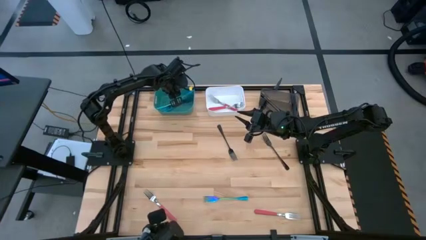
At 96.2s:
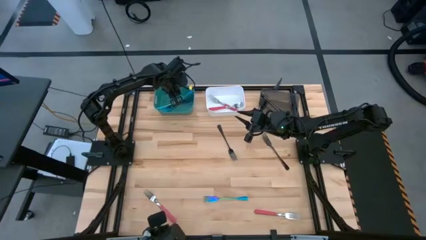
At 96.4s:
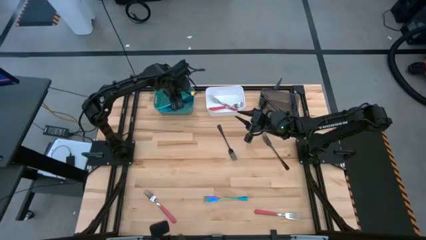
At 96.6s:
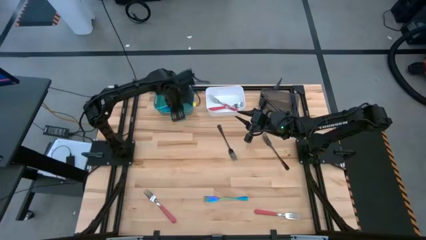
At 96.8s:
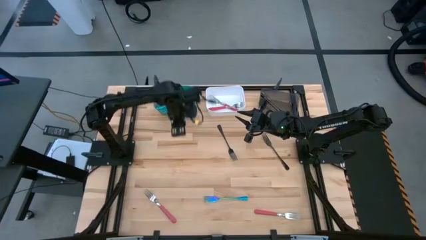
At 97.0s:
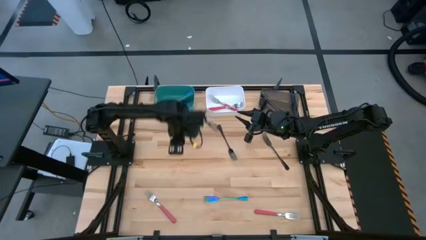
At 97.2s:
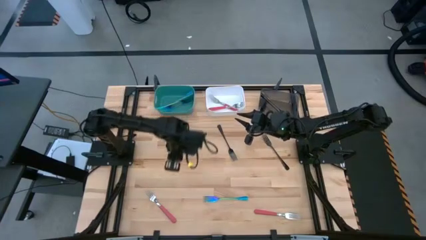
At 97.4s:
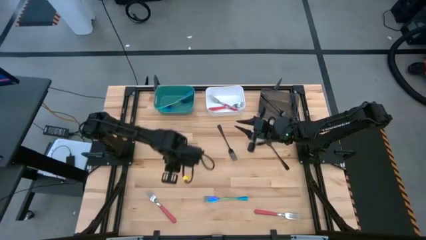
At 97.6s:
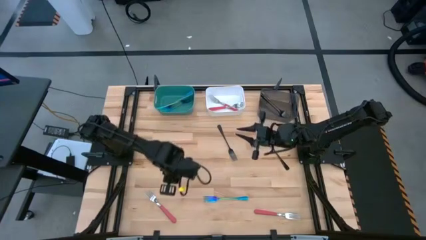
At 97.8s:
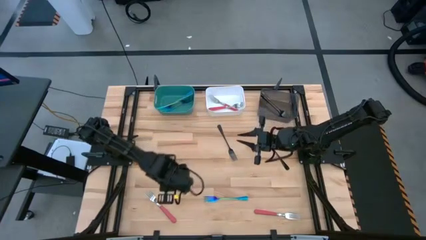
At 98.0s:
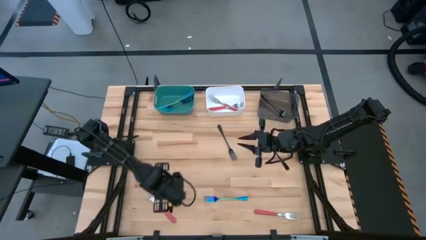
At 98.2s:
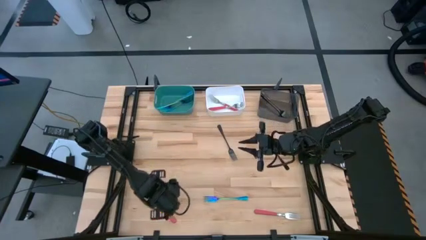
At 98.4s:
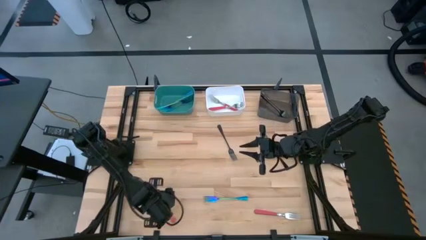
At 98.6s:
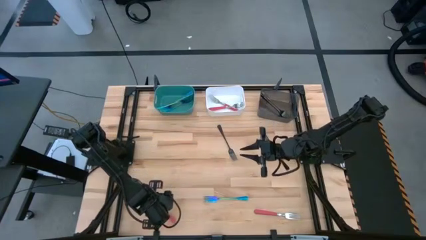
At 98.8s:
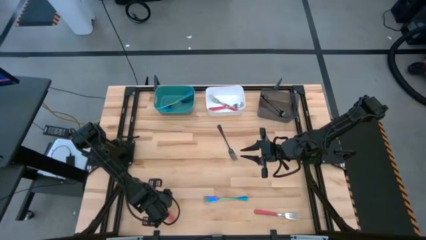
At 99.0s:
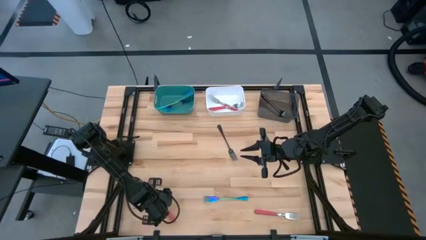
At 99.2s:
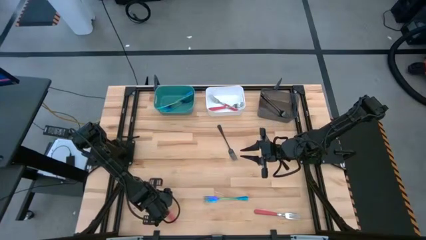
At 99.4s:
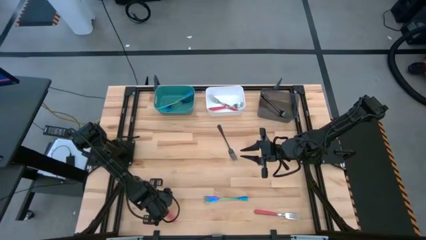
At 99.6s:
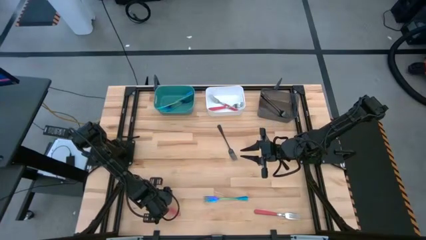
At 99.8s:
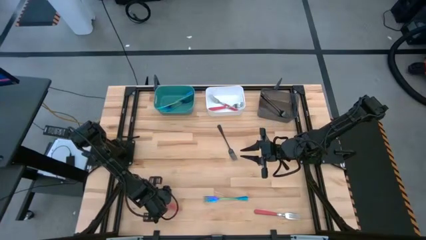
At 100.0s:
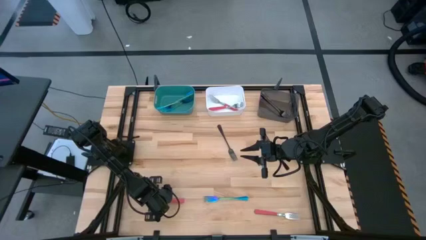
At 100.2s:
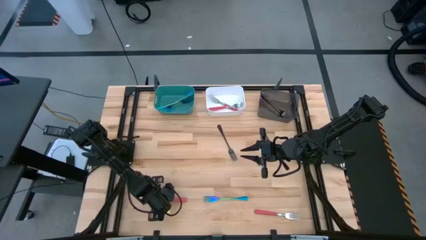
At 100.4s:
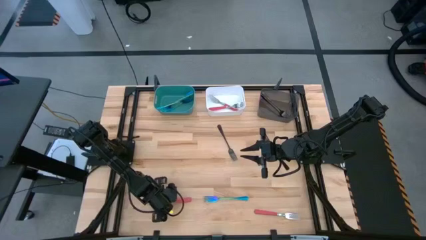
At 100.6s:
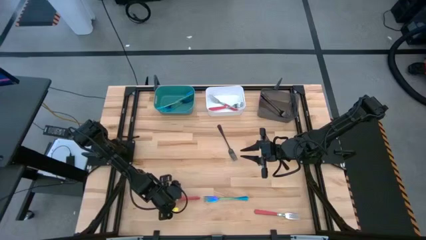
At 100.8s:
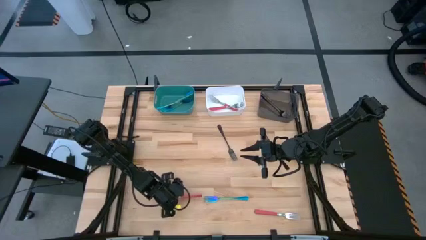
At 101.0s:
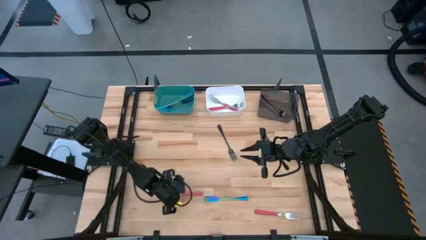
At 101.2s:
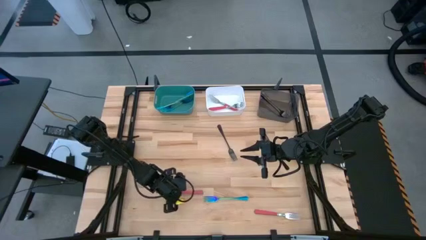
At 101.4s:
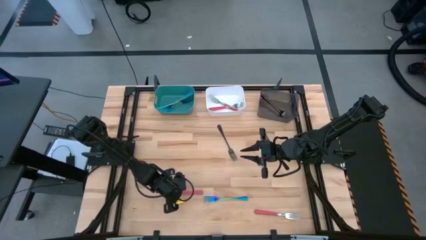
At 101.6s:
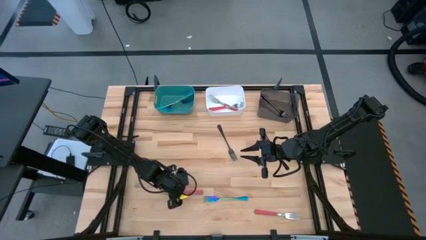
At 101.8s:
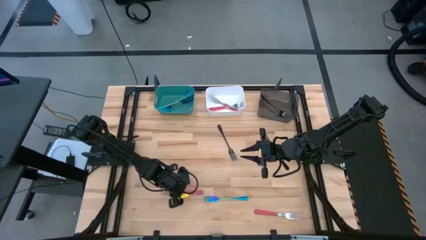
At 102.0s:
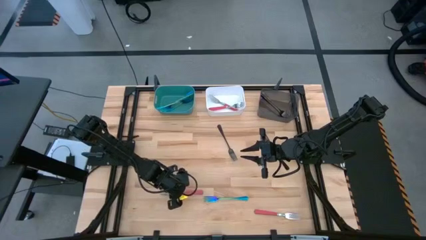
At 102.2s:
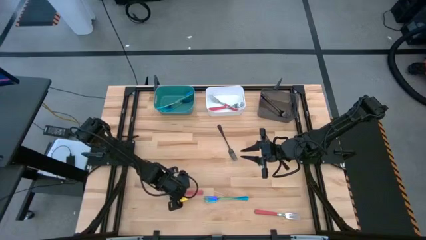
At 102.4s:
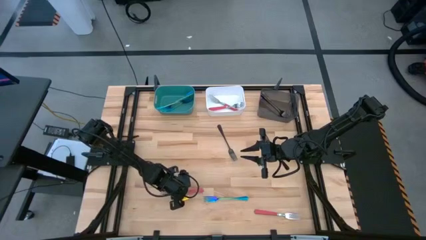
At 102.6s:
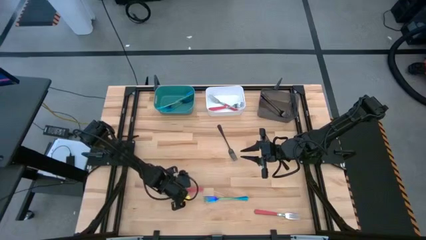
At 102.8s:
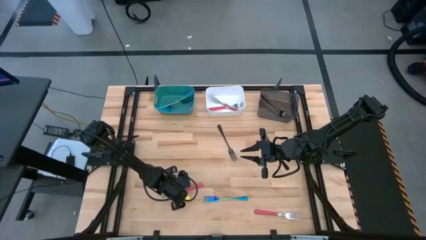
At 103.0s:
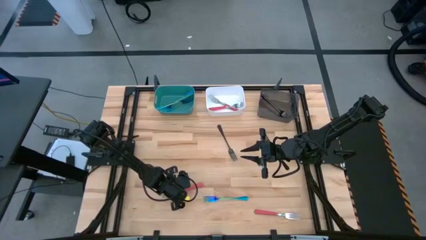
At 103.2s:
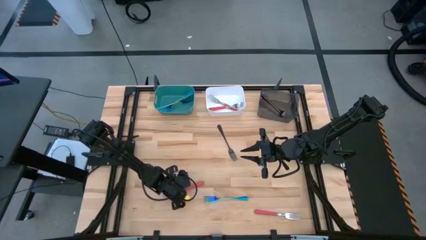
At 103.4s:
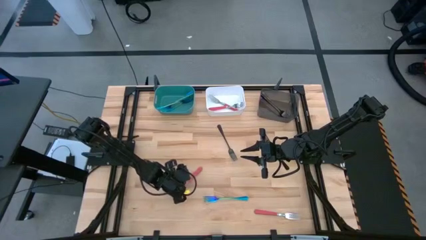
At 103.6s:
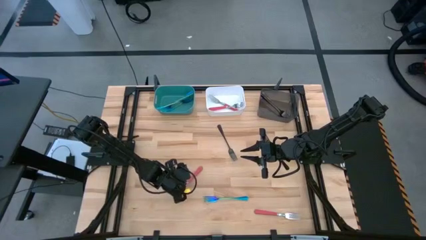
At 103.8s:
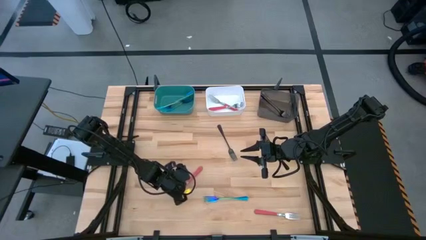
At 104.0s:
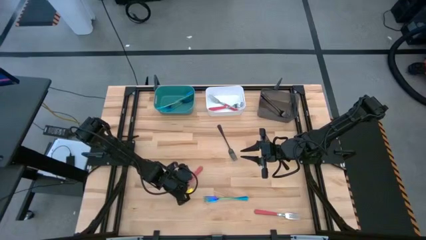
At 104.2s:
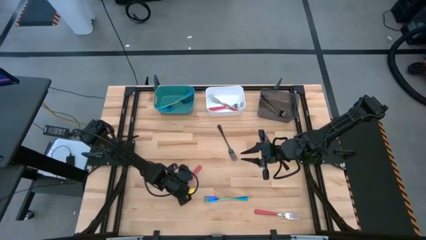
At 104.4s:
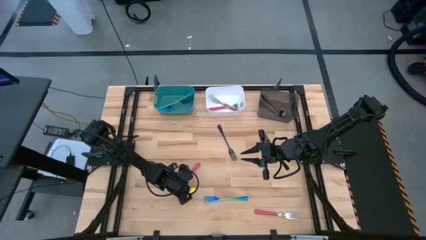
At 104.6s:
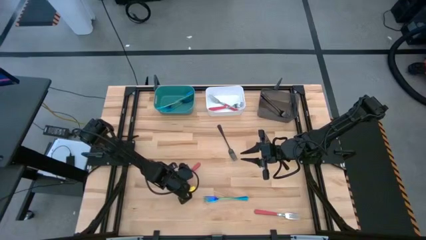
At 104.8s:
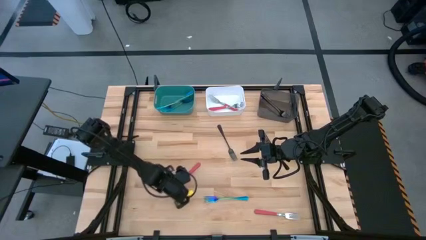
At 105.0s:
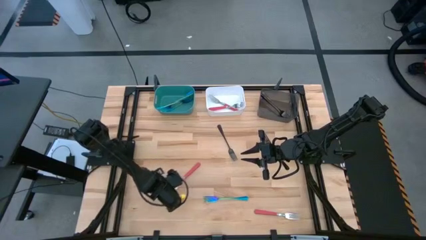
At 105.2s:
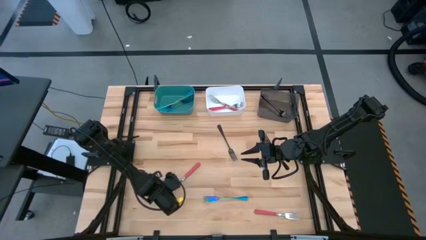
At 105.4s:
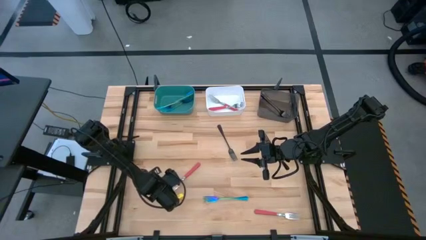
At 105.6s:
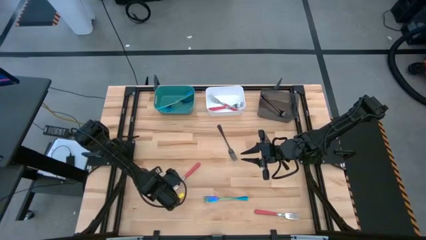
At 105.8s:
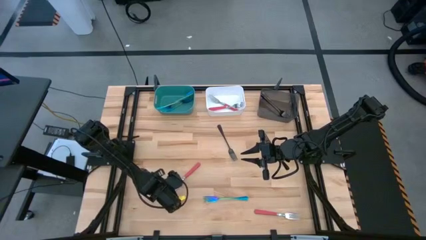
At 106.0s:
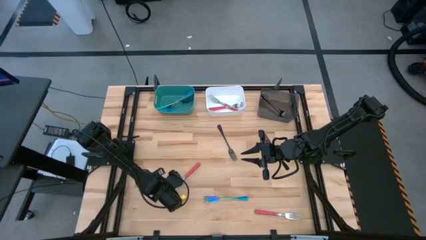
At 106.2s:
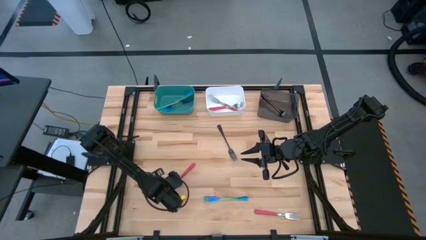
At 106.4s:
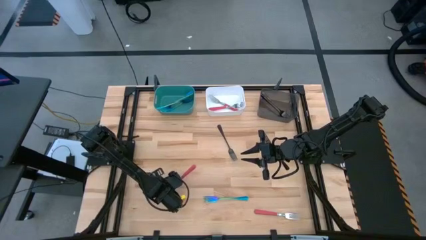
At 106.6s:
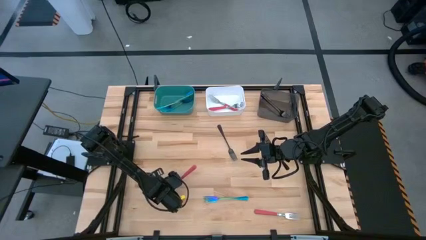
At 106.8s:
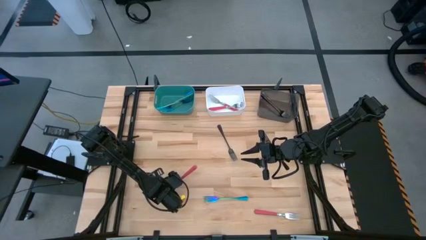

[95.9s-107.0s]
Task: Sort silverware by color (type)
Put the red fork into the white bin

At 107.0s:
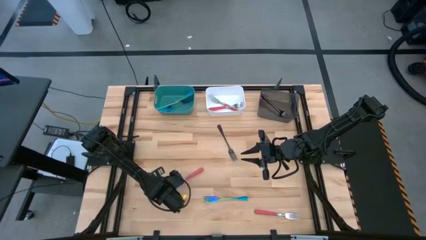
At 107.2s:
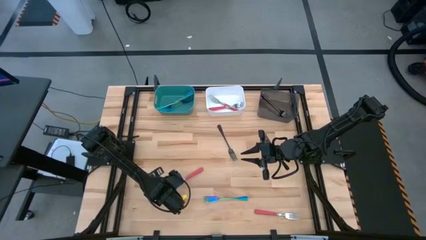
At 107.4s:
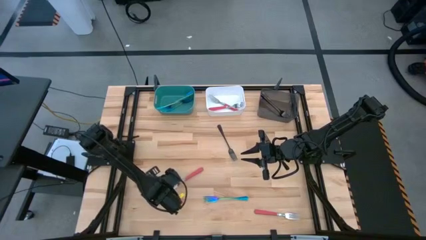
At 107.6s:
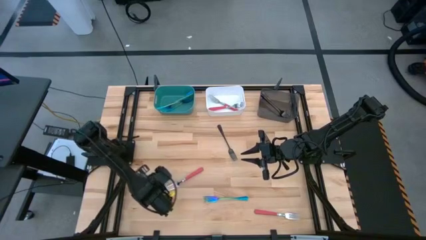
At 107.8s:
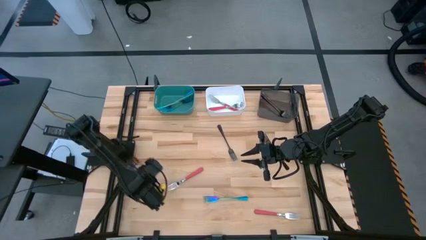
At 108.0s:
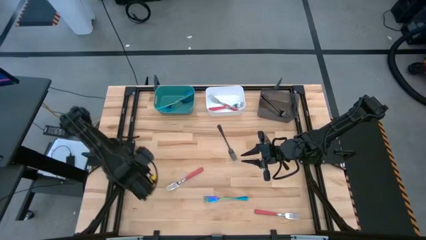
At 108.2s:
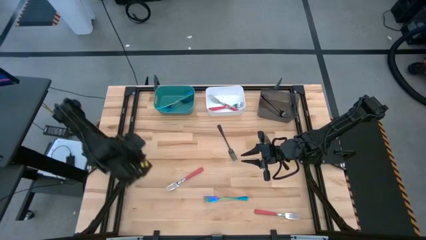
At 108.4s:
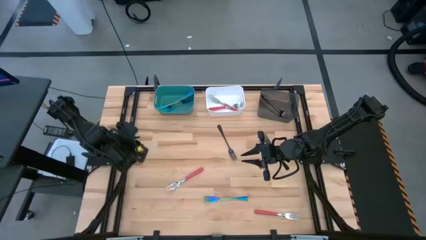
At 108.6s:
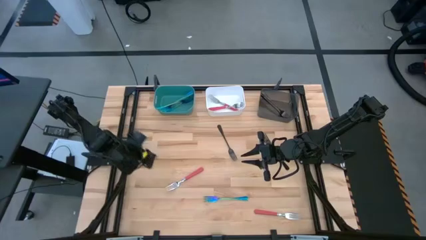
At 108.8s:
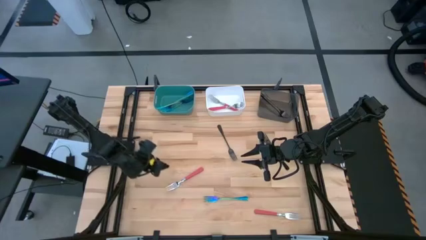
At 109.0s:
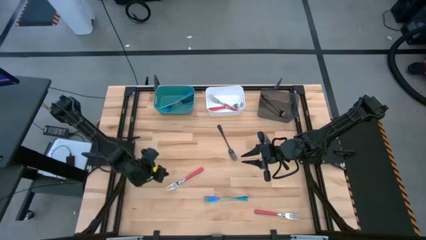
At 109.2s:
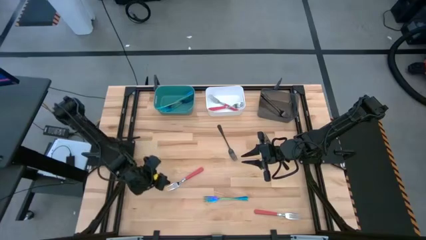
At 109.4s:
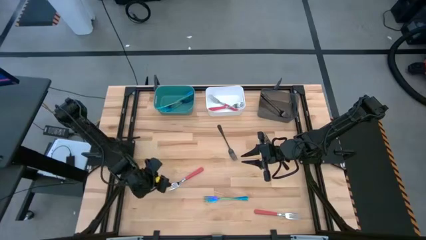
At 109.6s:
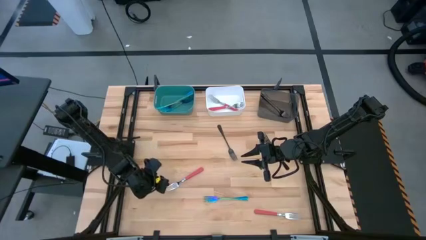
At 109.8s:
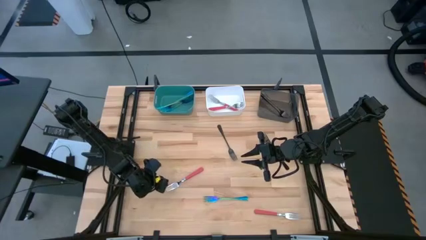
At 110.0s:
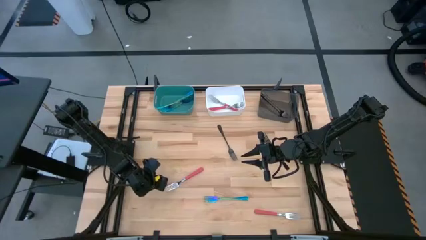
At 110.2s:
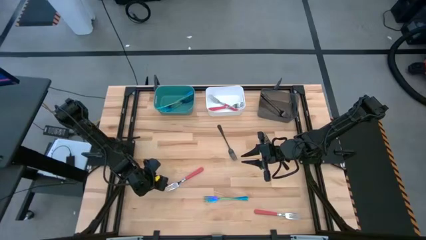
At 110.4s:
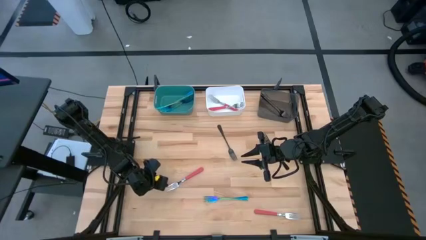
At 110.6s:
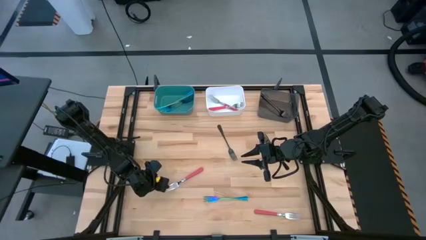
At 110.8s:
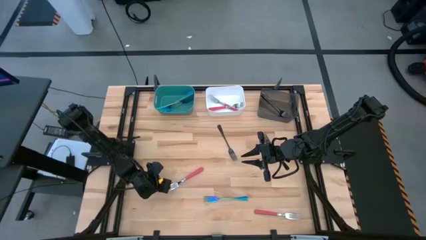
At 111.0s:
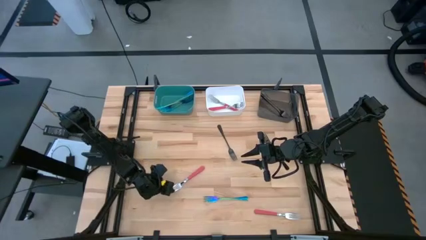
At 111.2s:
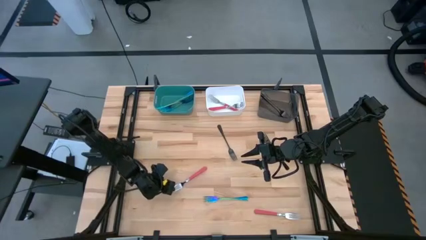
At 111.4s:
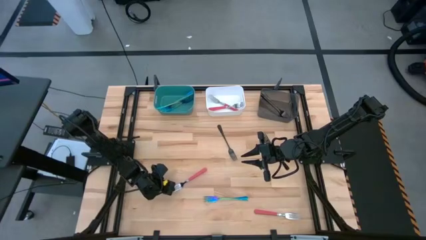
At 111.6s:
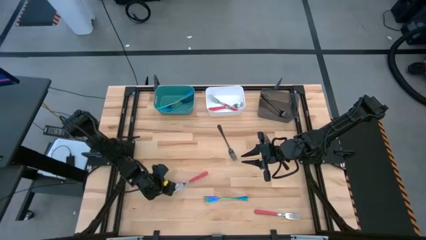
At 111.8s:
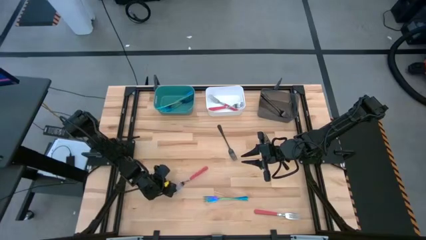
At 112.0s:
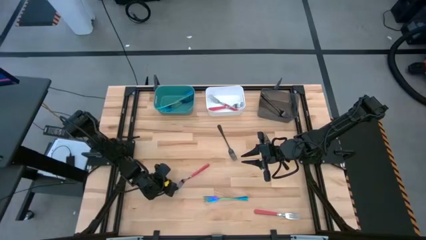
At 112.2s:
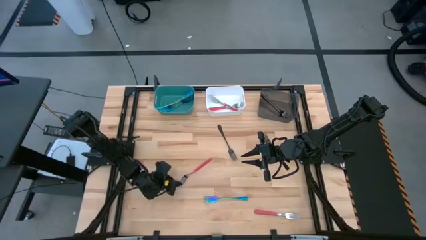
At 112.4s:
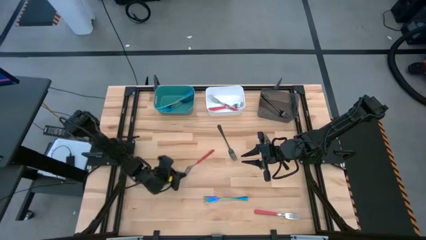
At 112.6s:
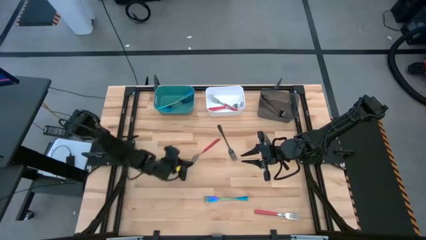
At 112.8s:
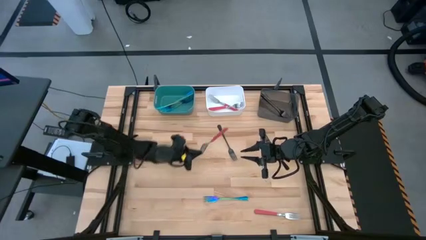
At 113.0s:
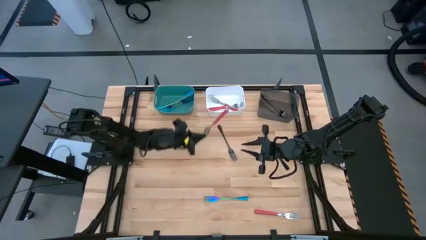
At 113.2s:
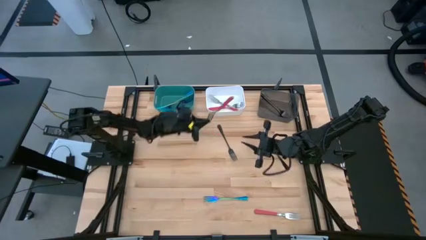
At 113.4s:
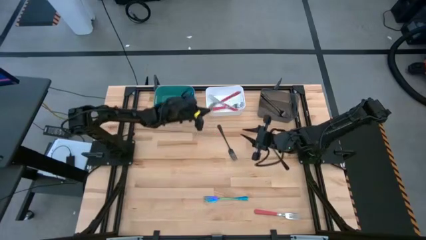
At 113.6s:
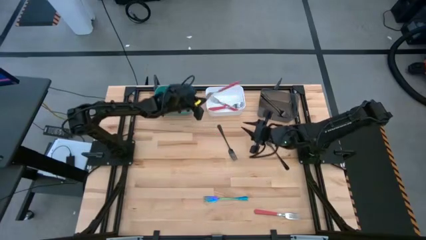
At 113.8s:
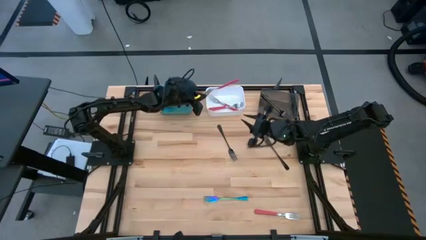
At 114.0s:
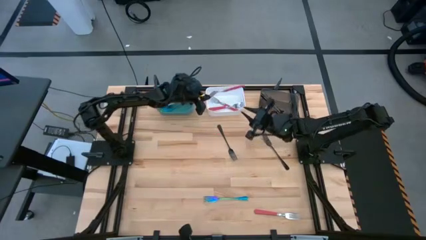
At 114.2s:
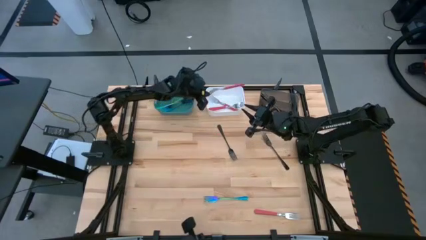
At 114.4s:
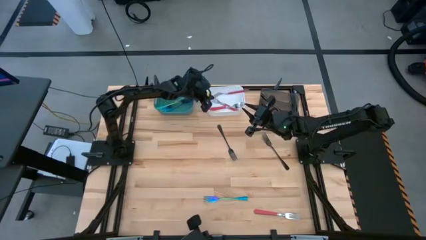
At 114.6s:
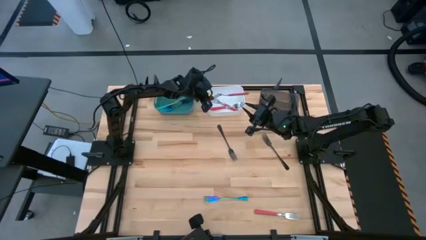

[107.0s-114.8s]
Put the red fork into the white bin
